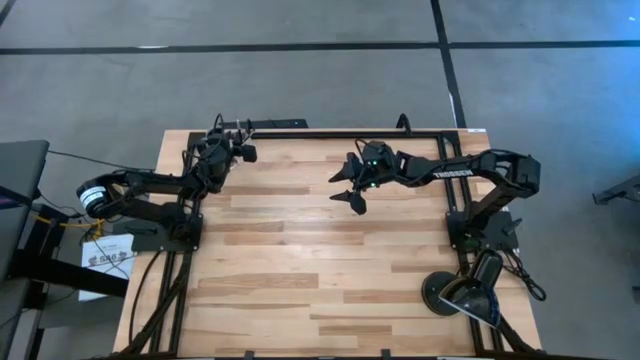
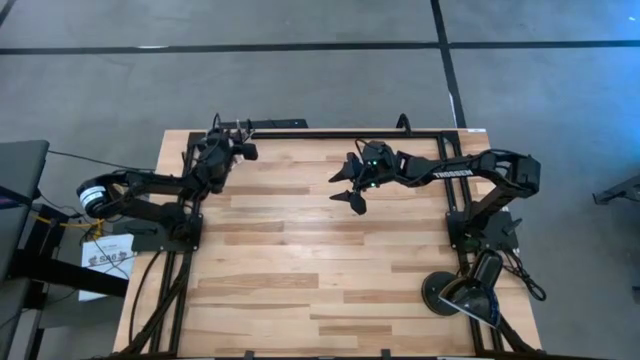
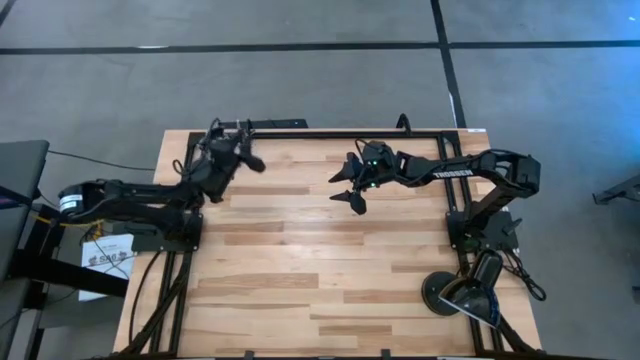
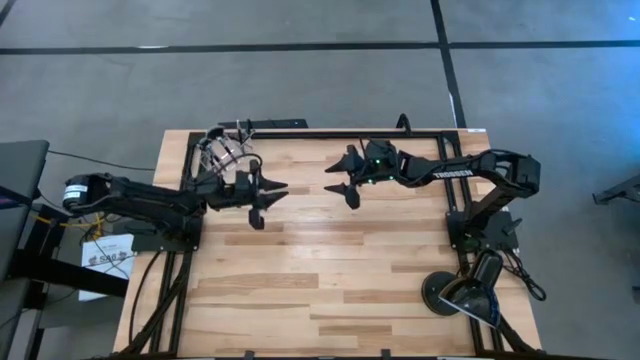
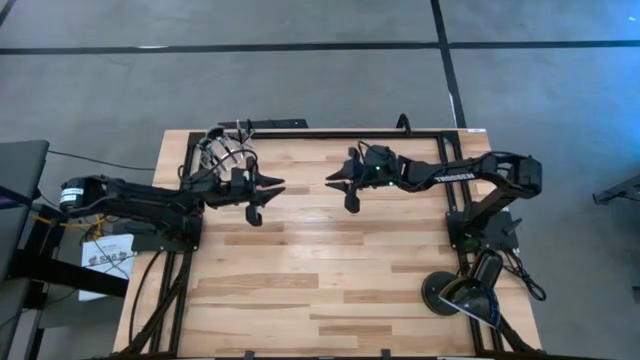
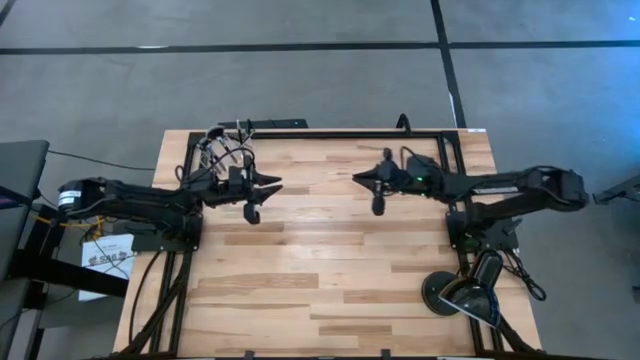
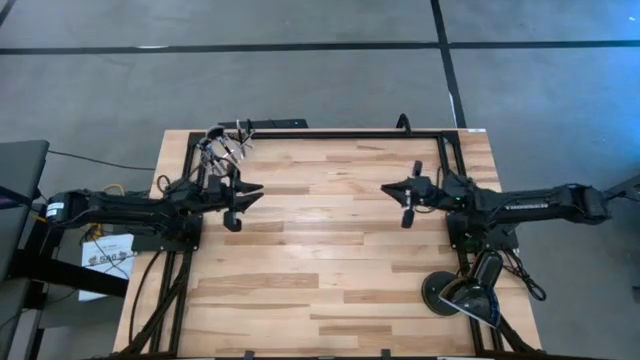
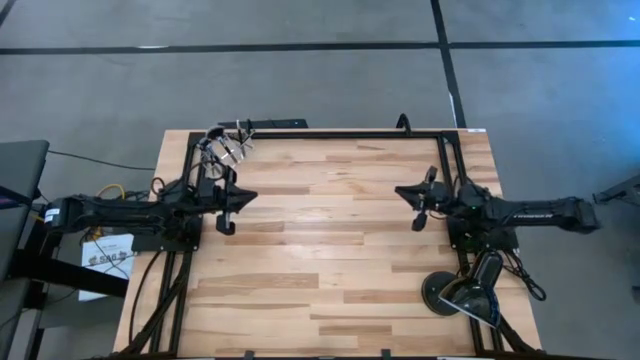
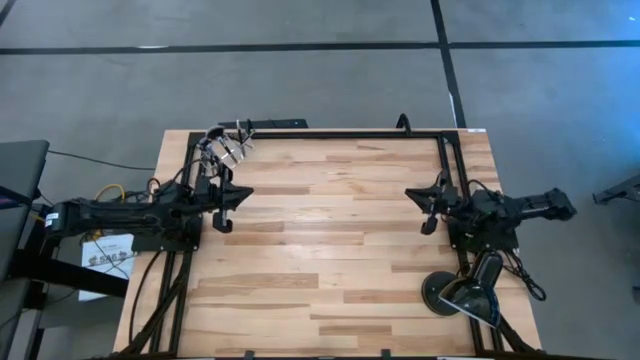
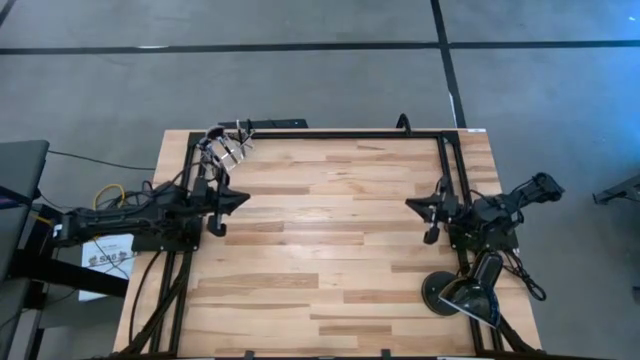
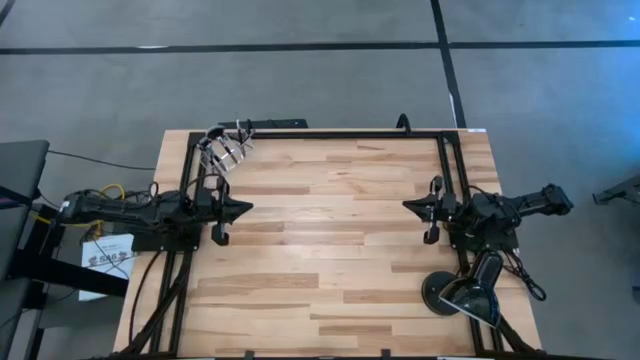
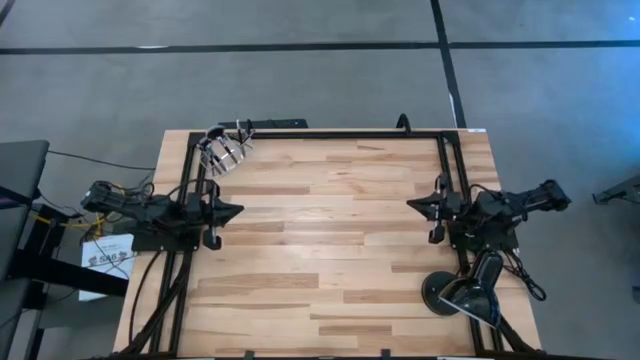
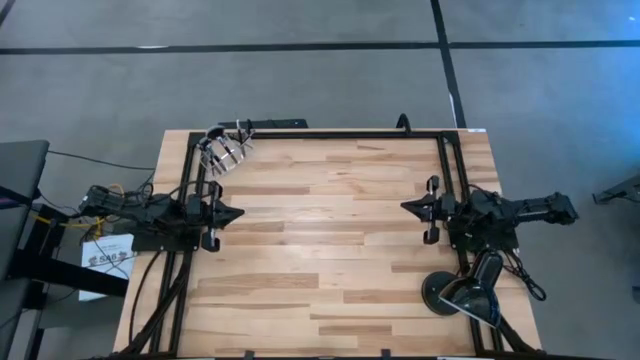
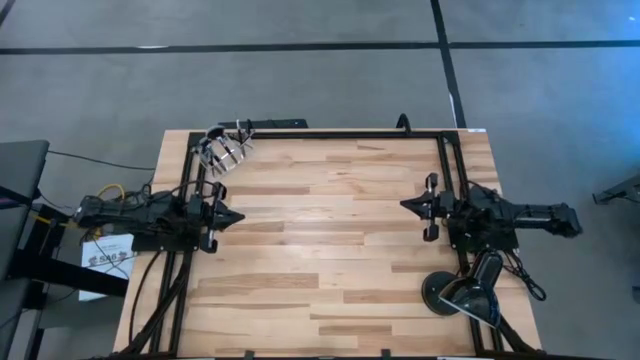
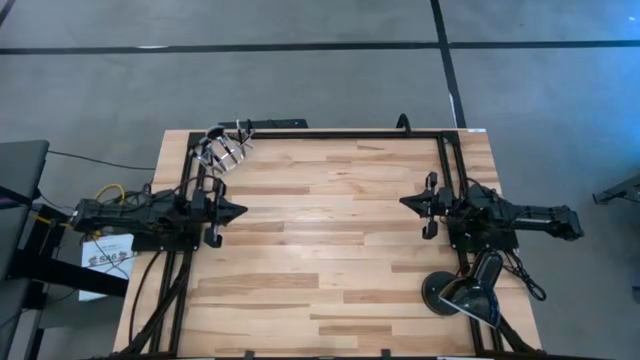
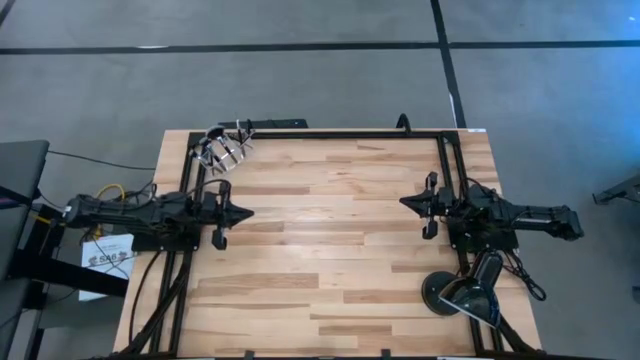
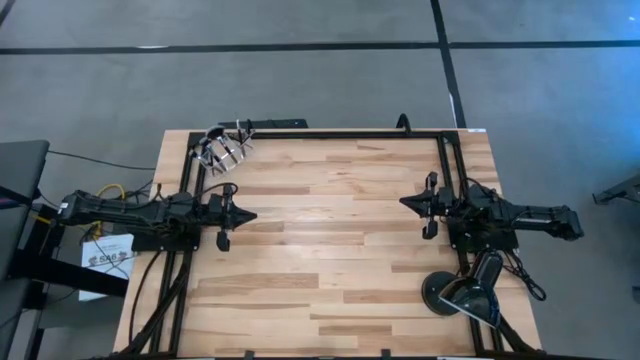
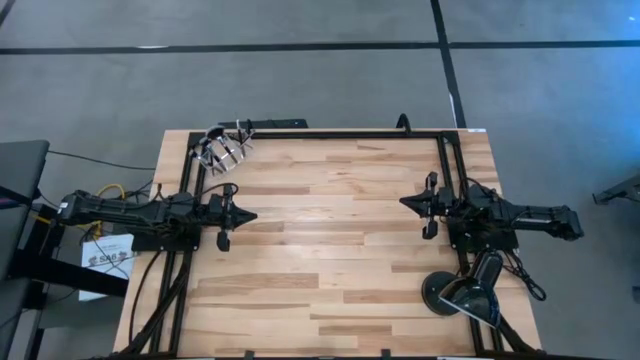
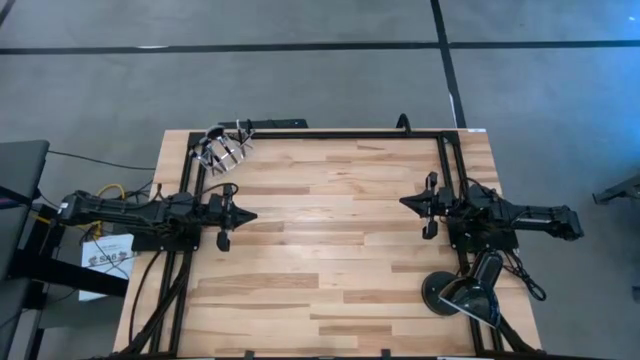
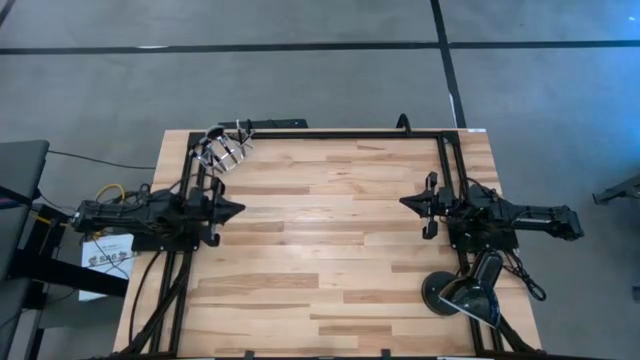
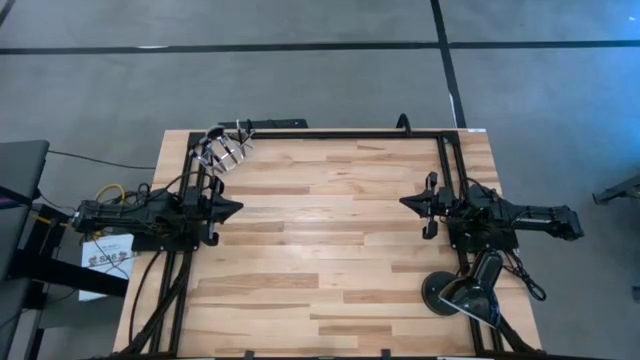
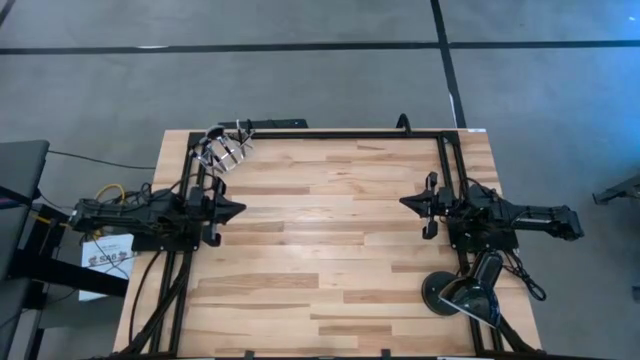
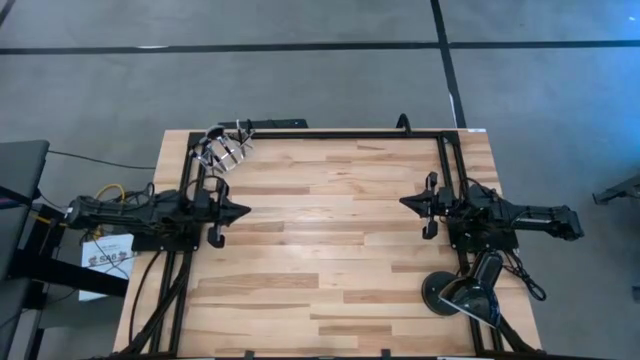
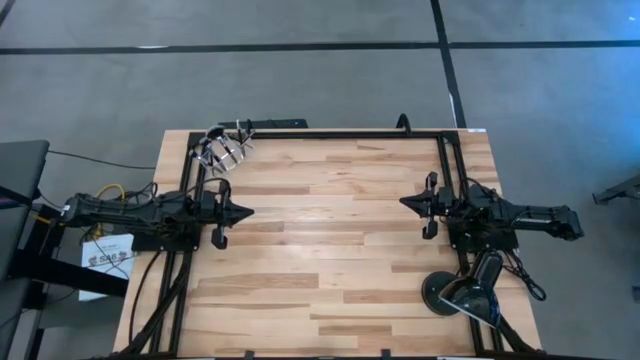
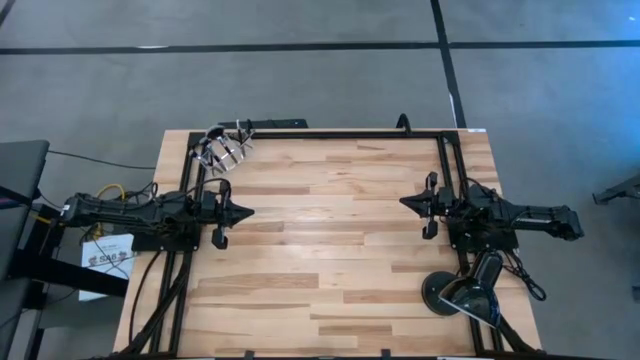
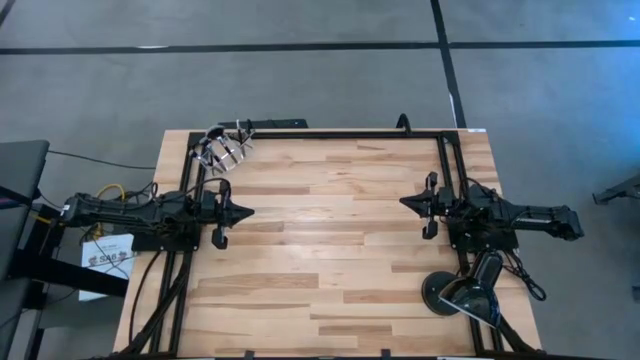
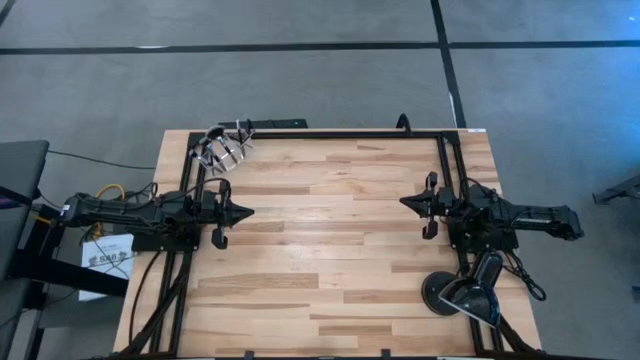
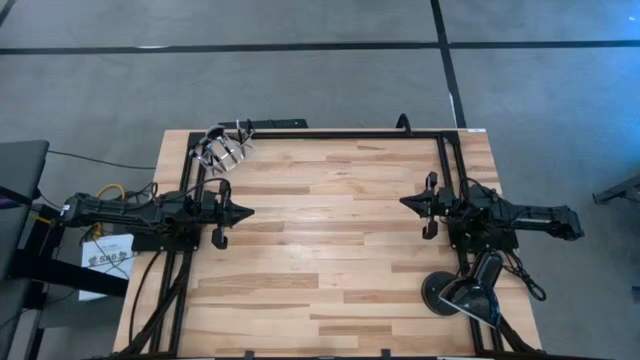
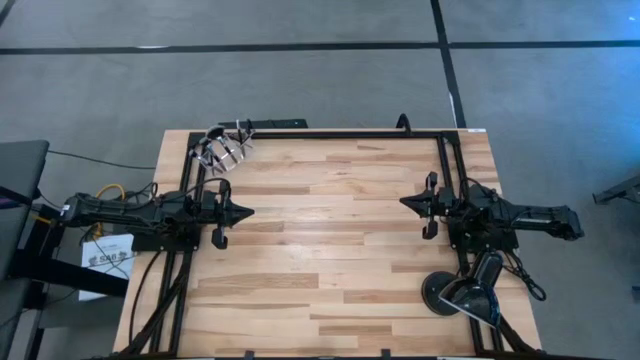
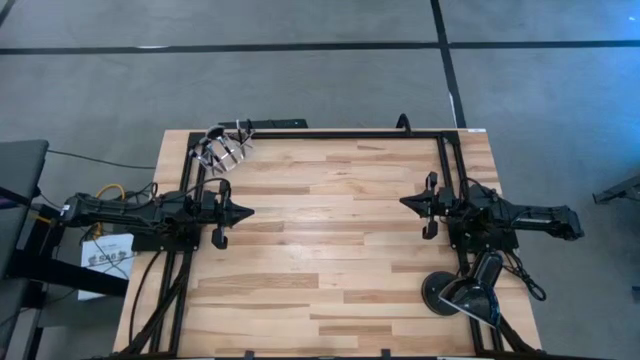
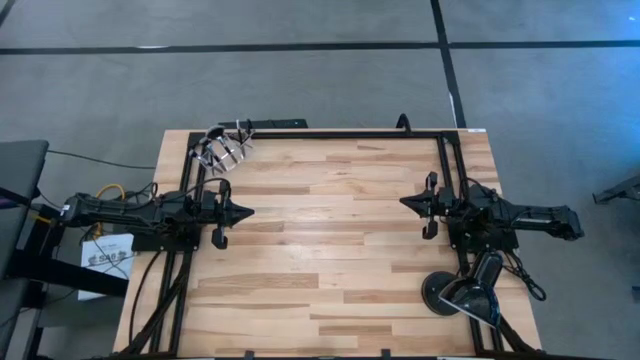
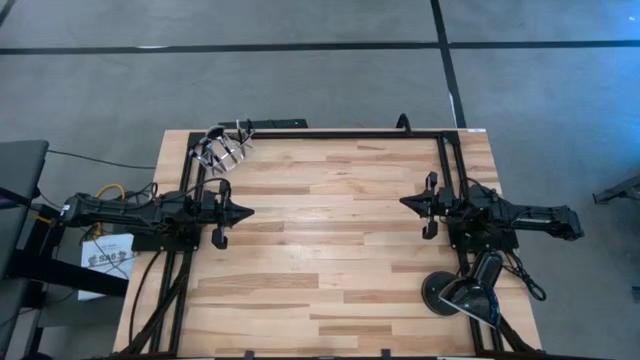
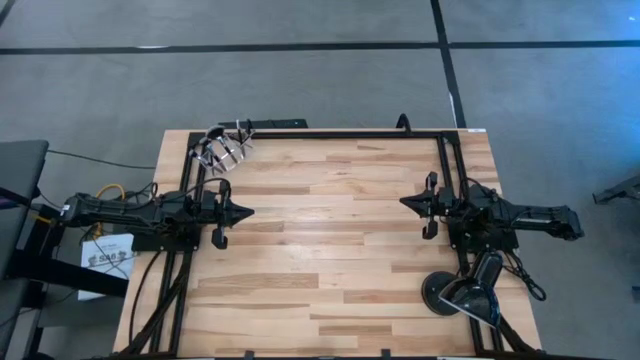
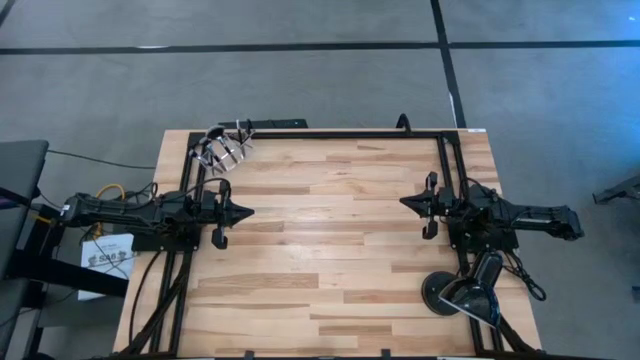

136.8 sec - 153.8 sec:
Task: Put items in baskets/containers
Return To Home Position

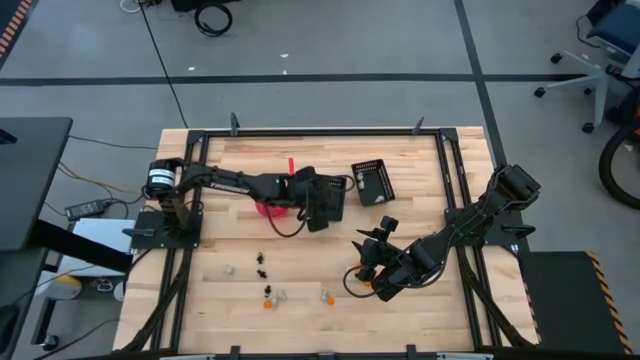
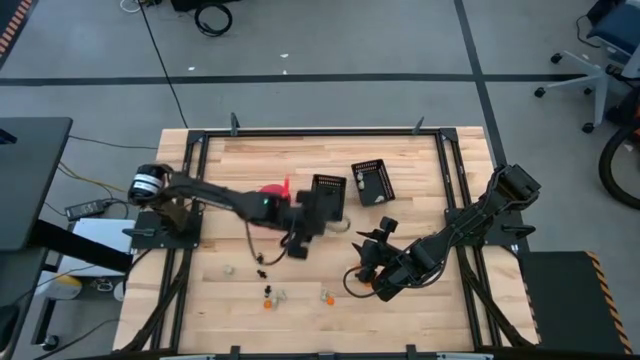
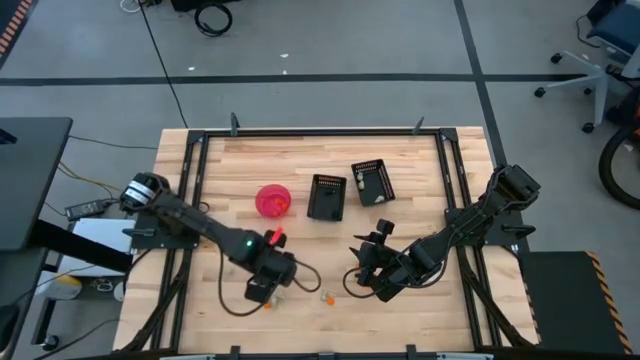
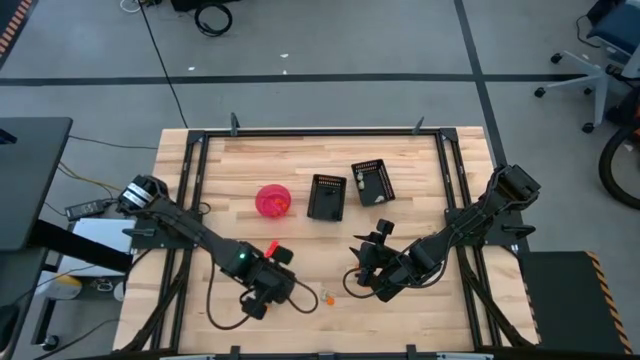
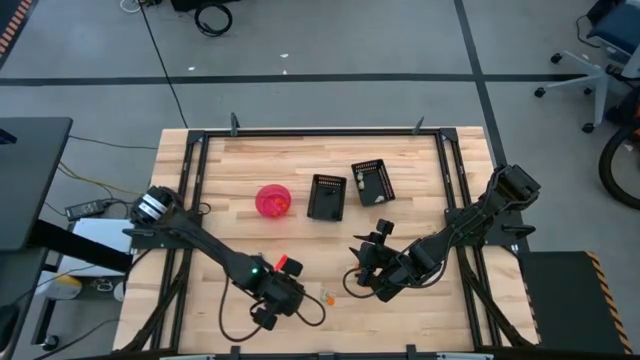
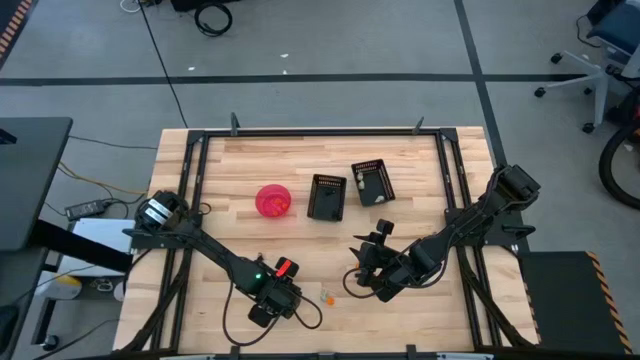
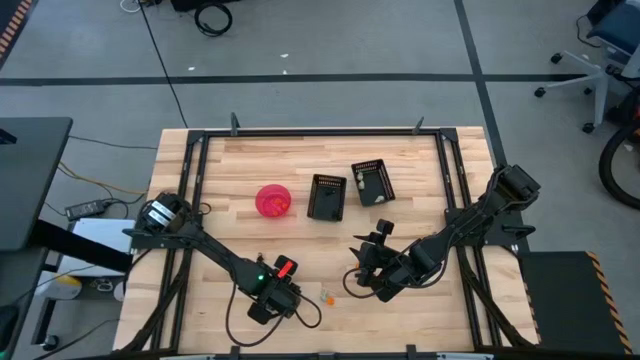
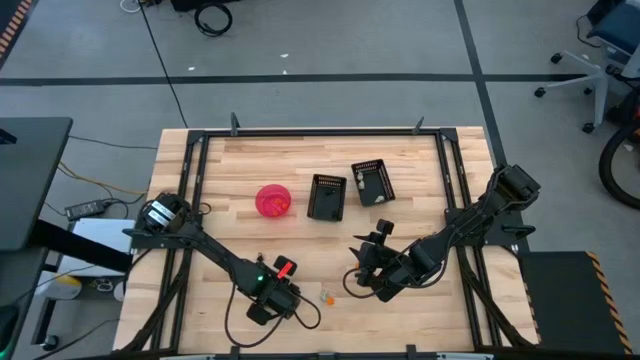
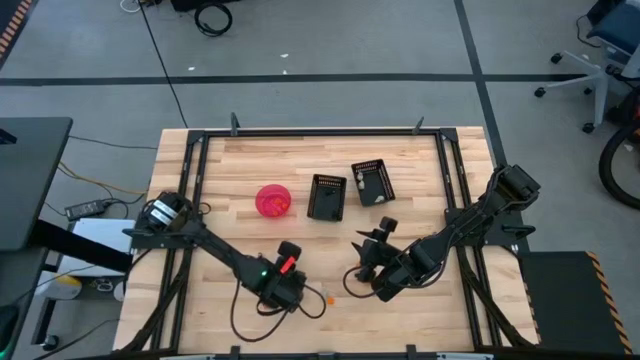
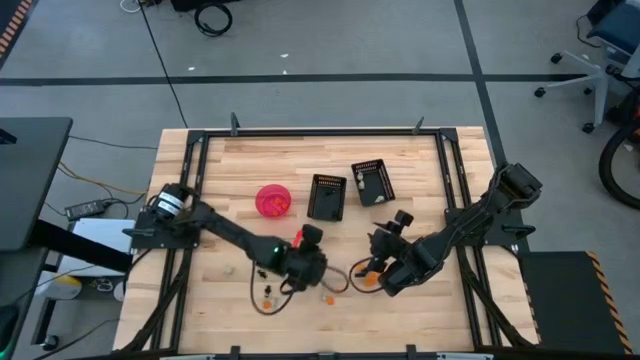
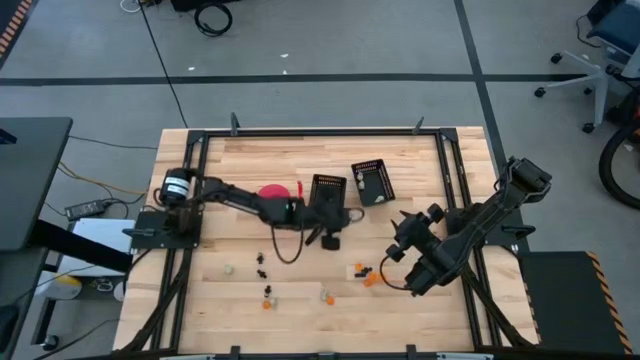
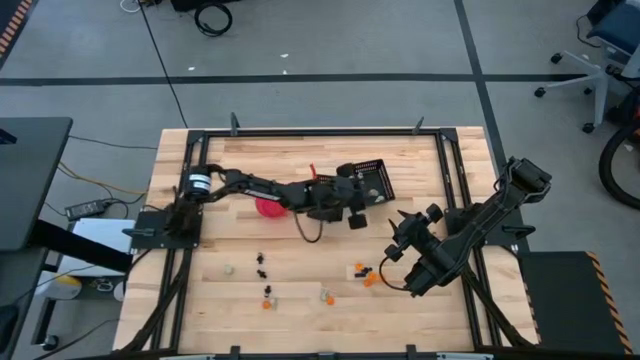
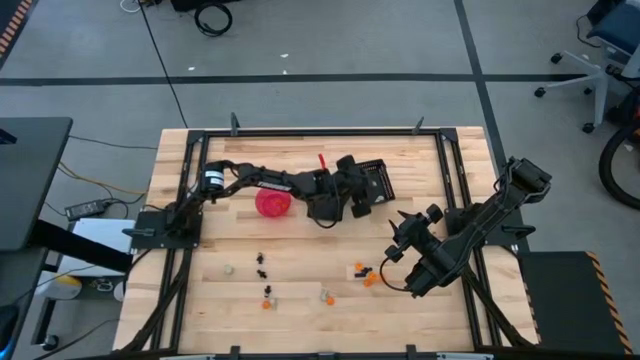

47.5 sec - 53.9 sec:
Task: Sort Halloween decoration
Put the white skull toy into the right black bin
